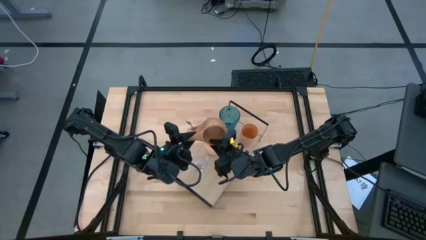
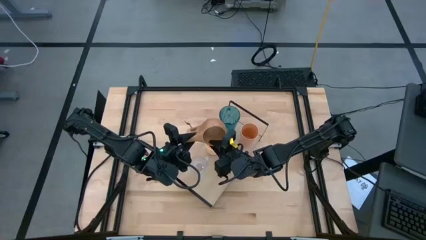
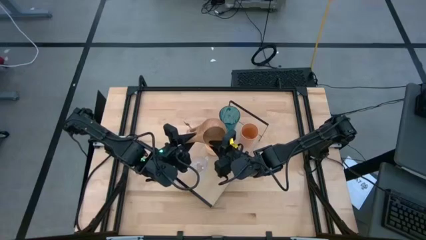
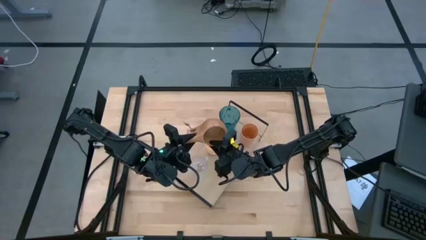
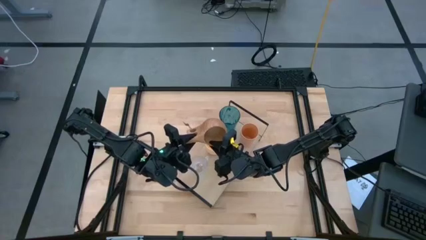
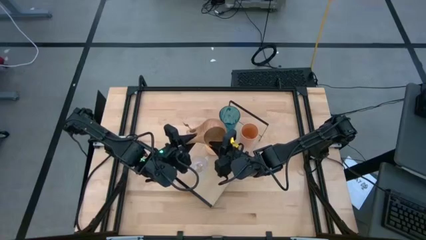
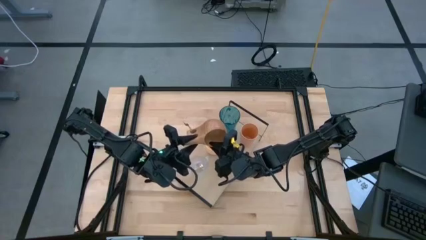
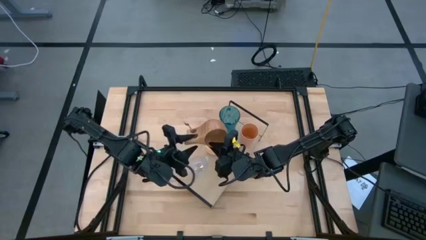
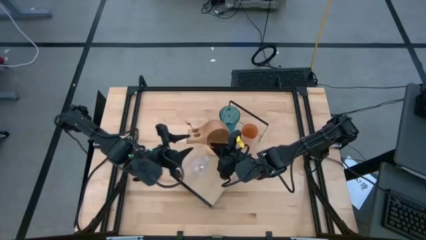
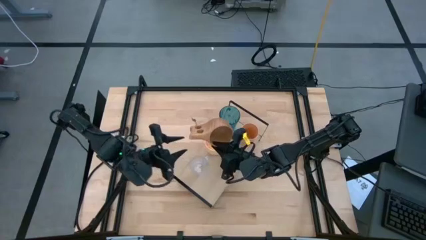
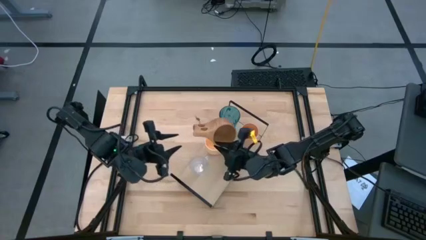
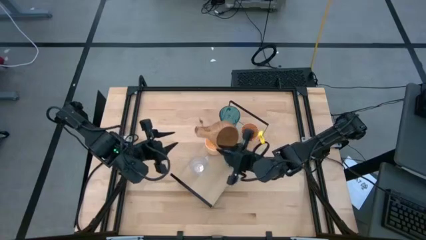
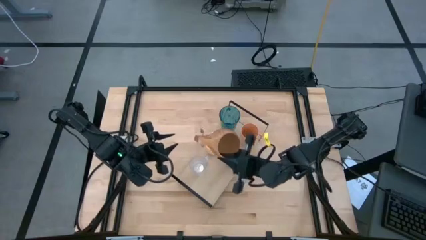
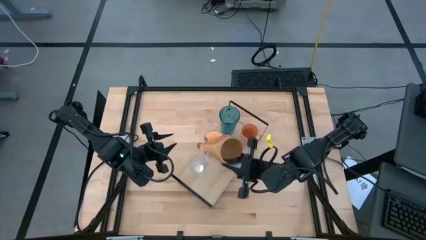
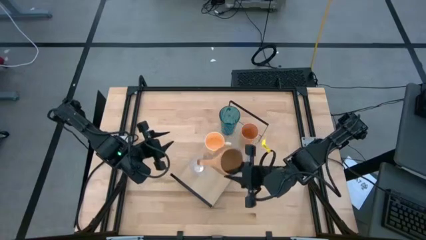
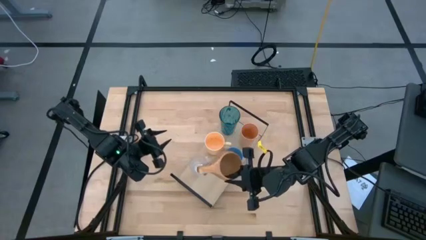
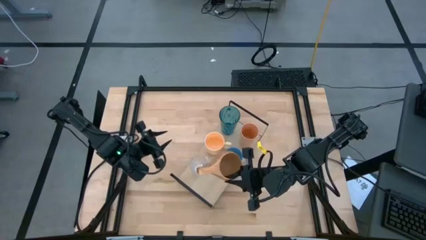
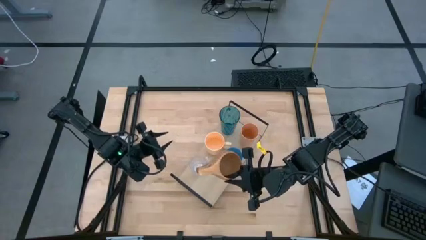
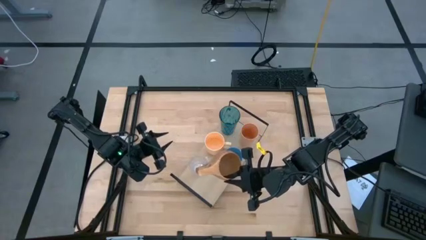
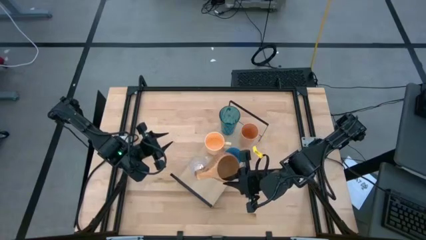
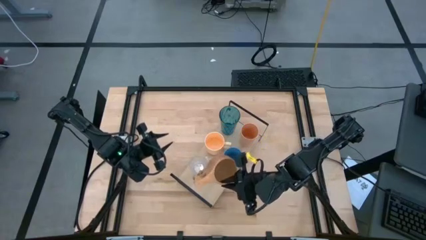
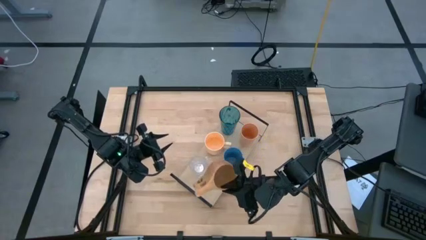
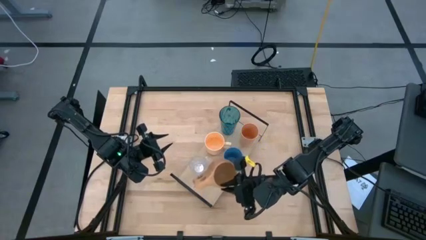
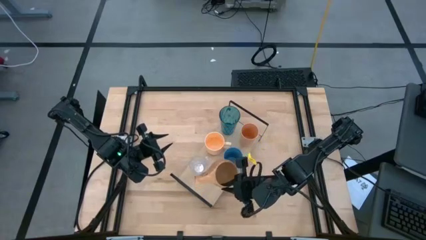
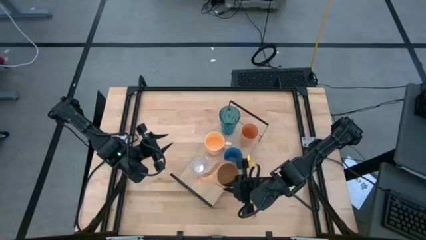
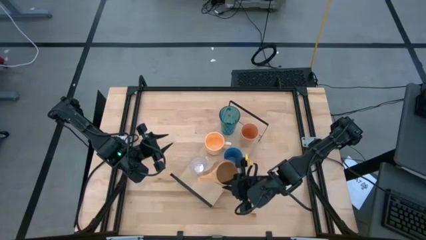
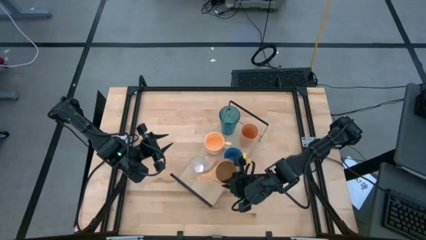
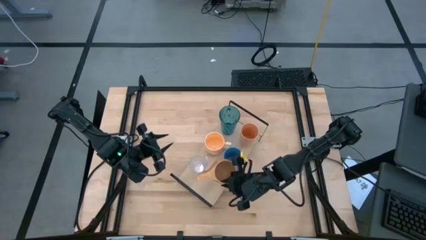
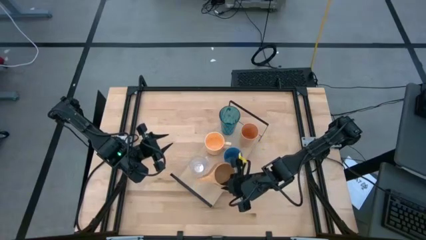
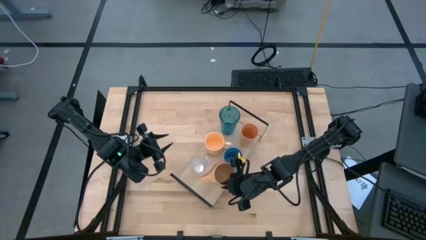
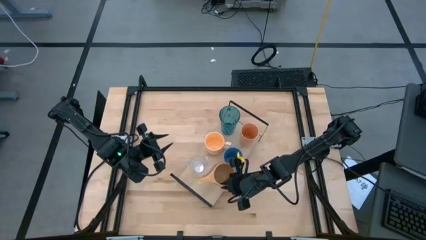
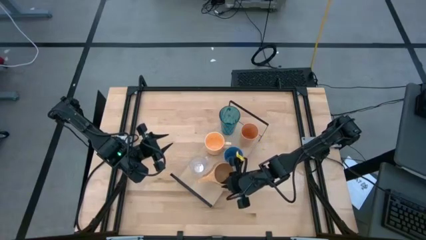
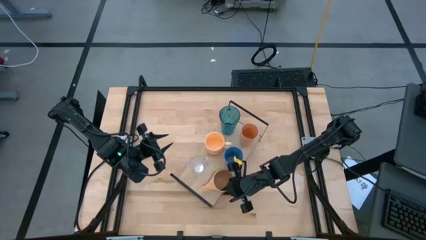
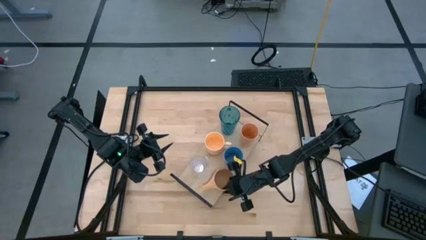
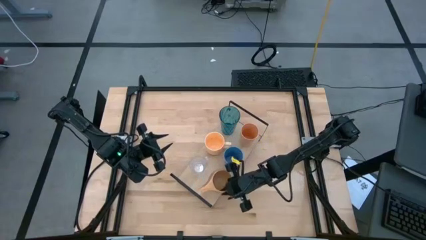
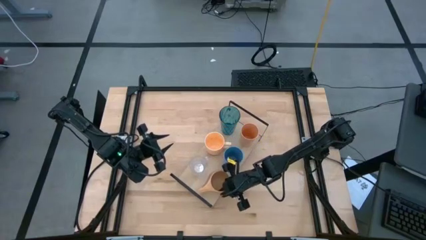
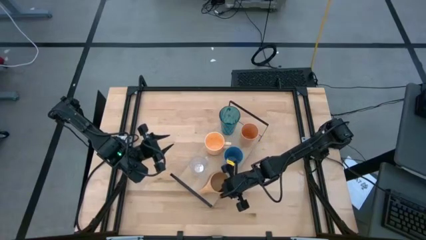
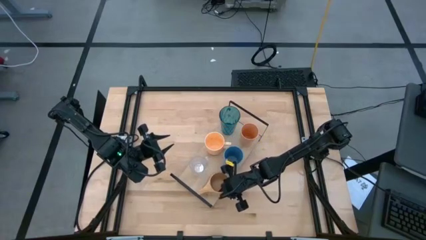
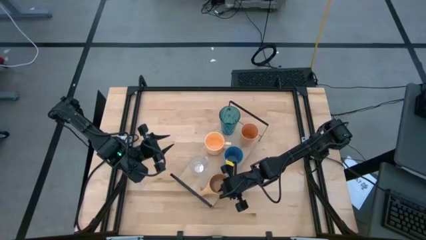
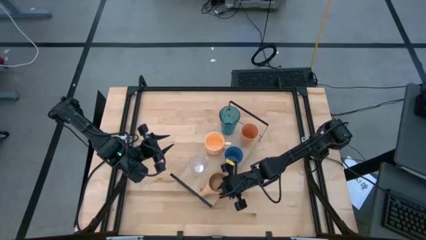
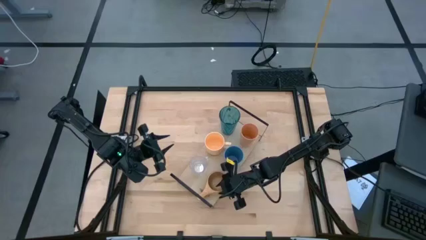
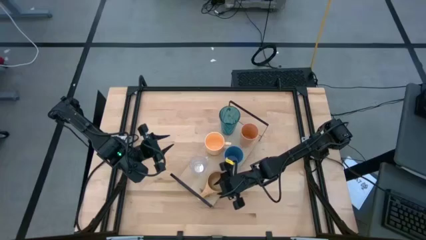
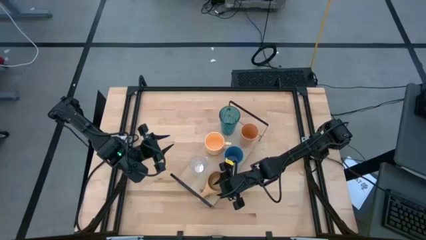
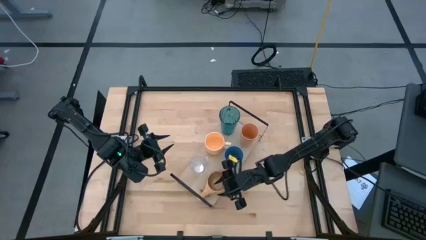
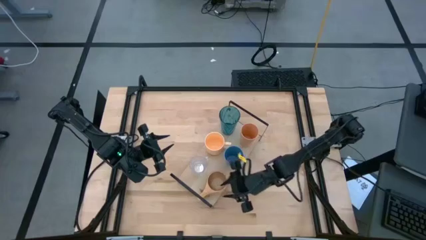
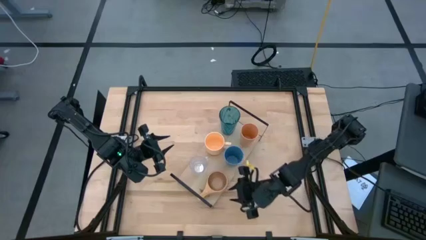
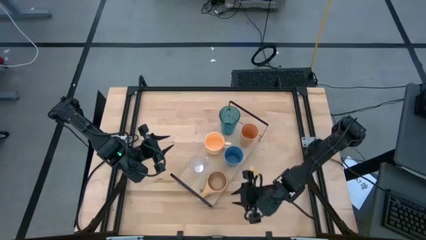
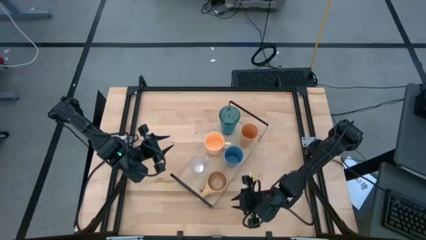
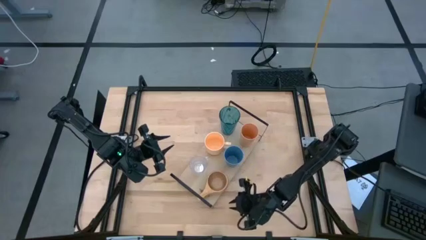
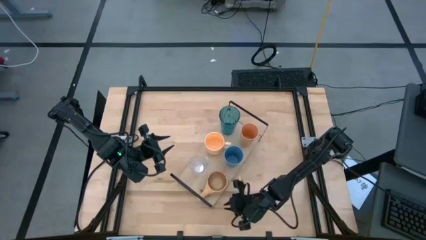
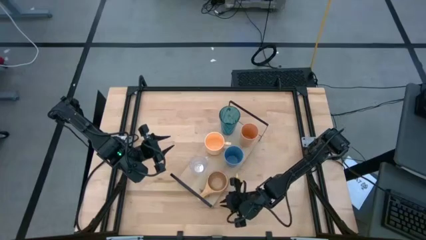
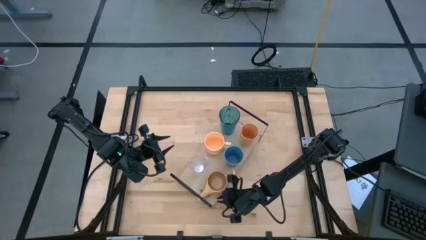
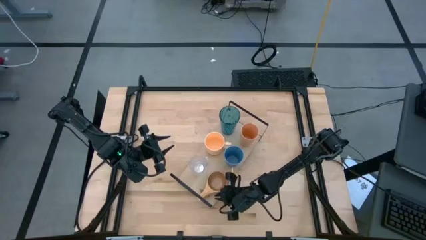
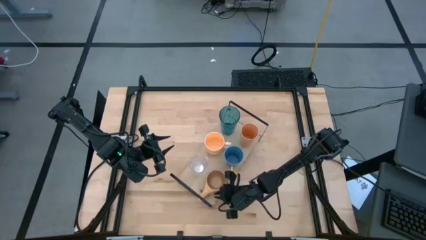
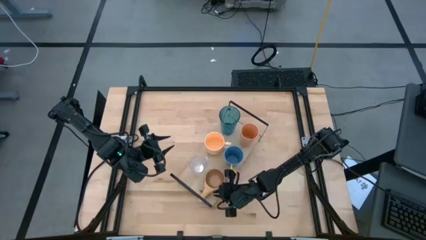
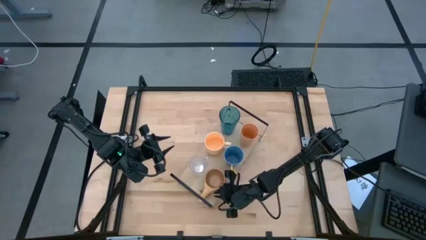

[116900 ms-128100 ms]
Task: Stack small to large cups/mugs on shelf
Put the brown wooden mug on the shelf

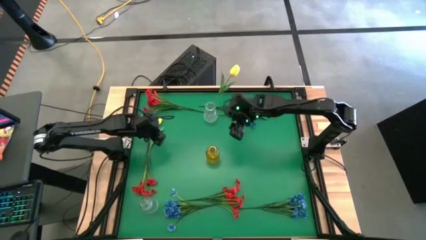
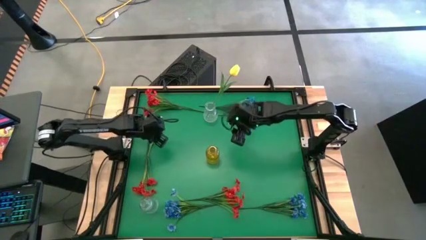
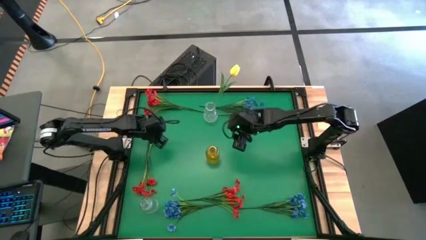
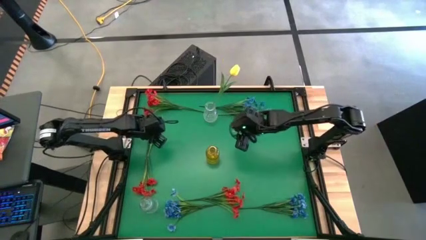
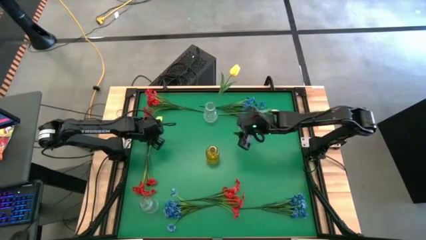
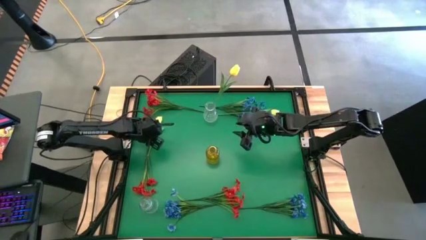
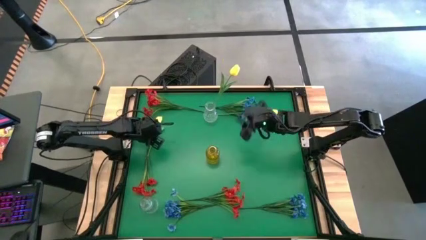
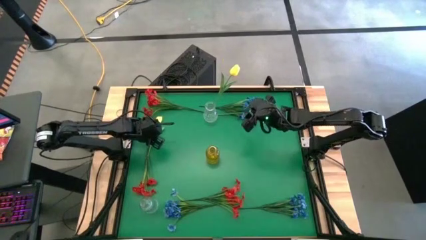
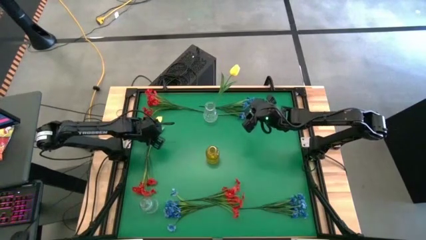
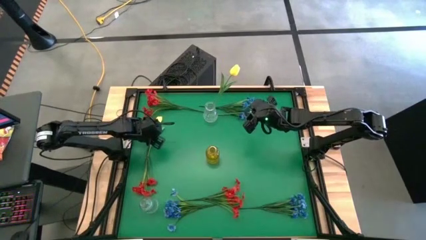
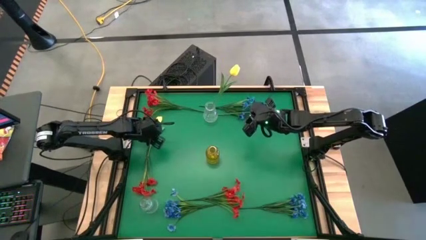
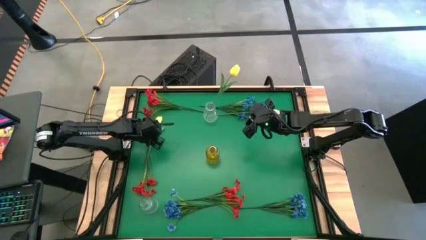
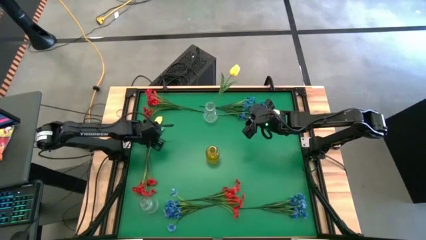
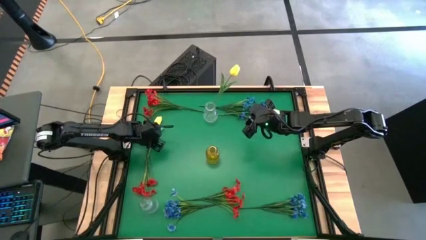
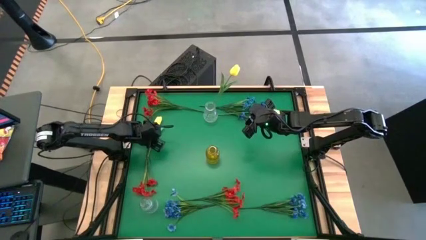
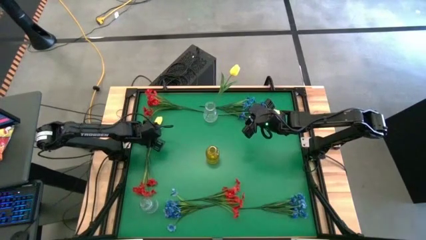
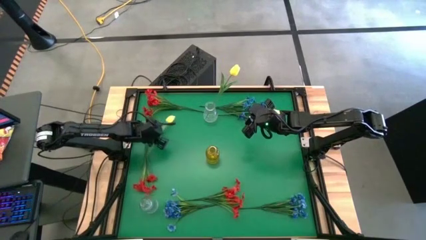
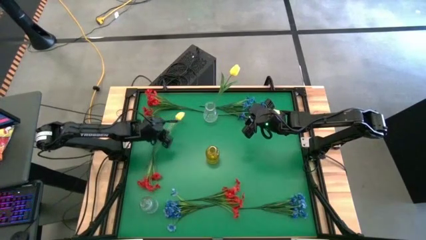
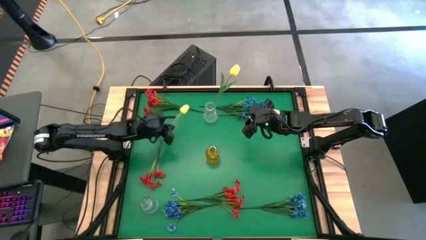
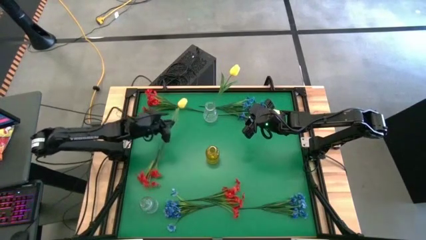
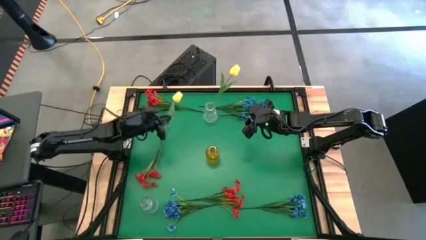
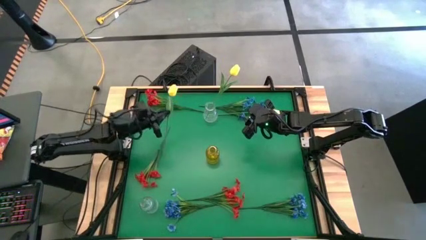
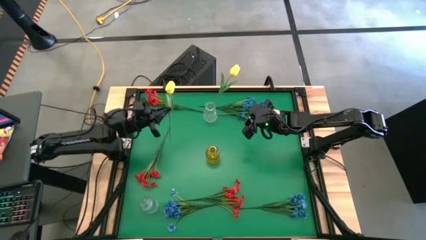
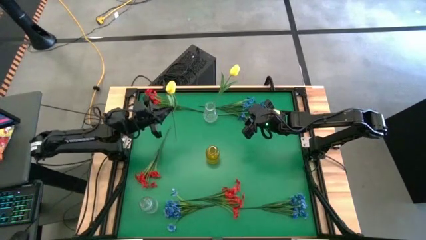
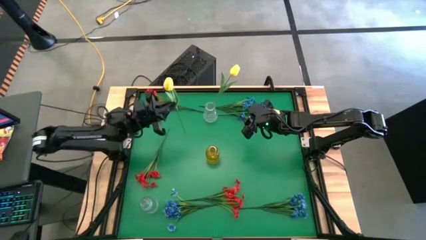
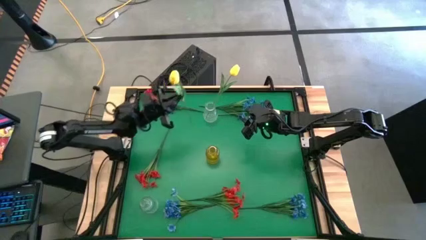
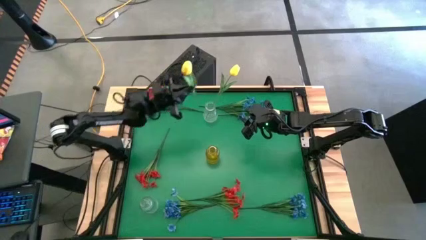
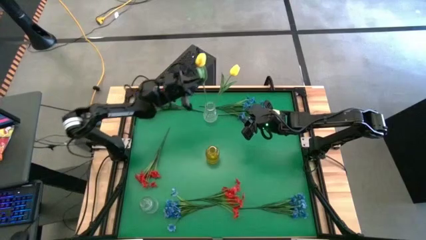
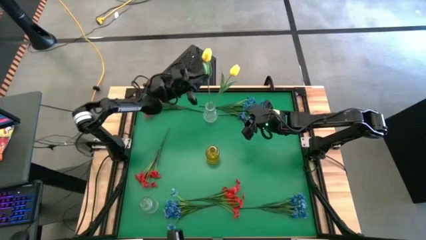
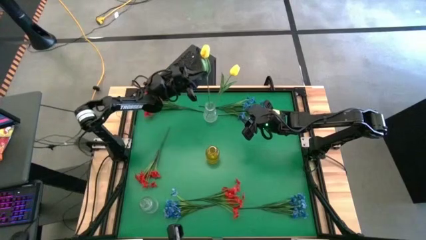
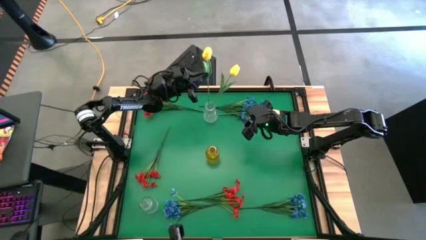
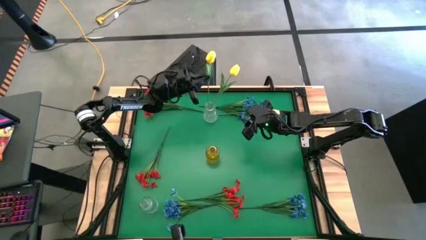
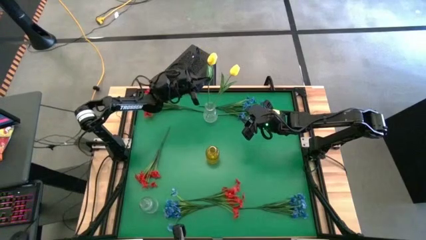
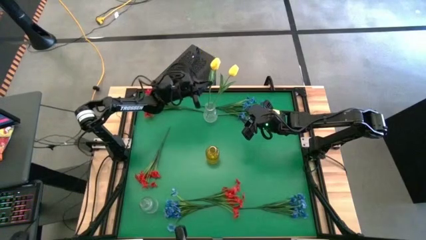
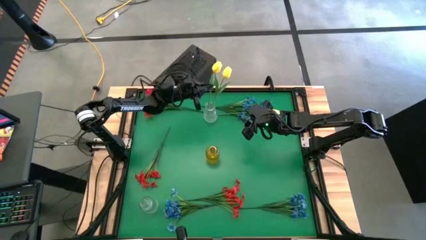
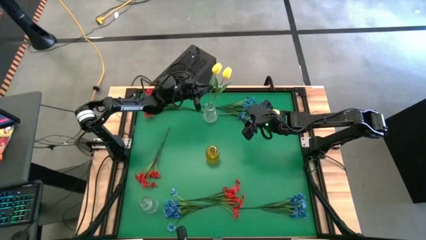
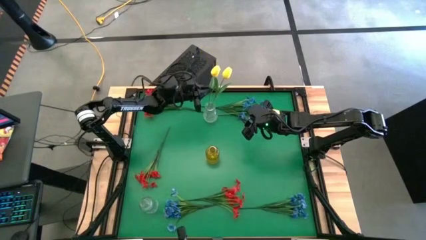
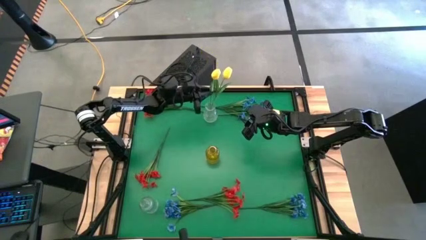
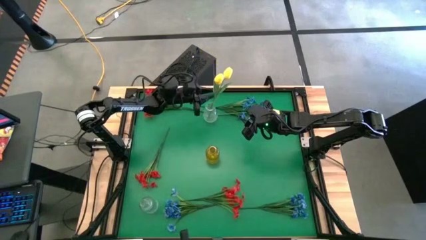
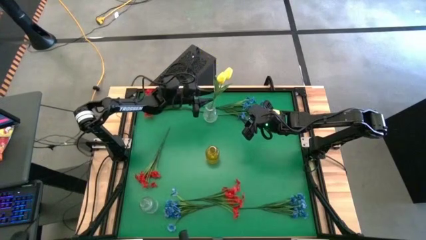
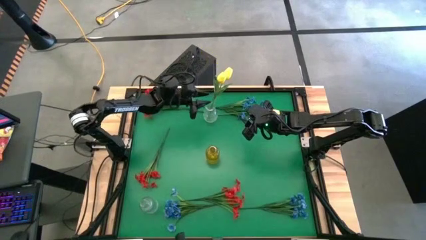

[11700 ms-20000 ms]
Task: Sort flowers into vase by color
Put the bottom yellow flower into the top transparent vase
